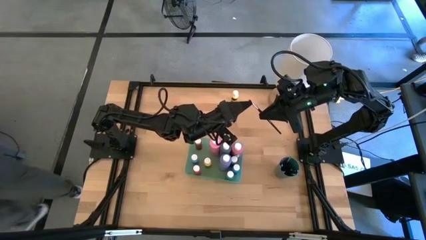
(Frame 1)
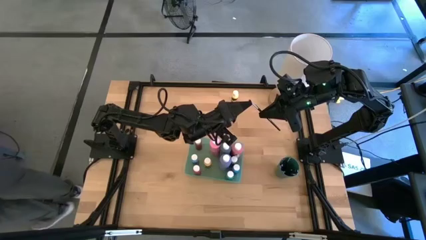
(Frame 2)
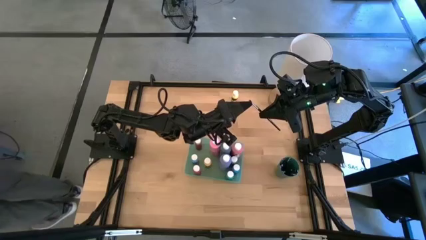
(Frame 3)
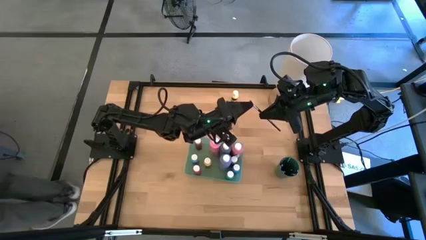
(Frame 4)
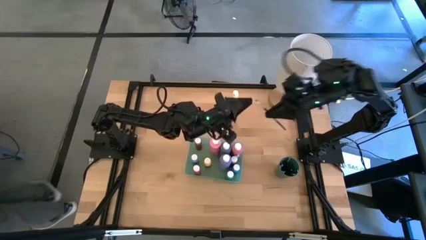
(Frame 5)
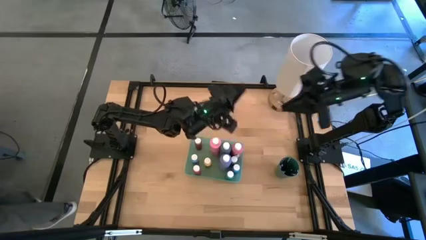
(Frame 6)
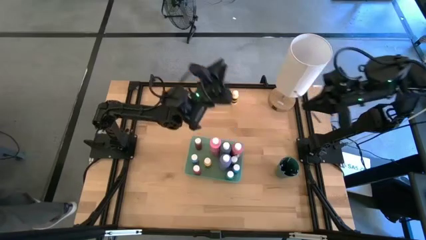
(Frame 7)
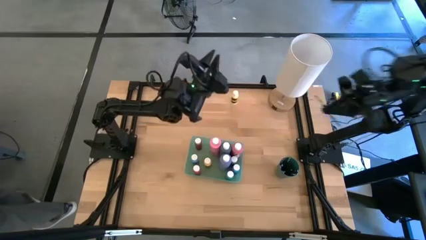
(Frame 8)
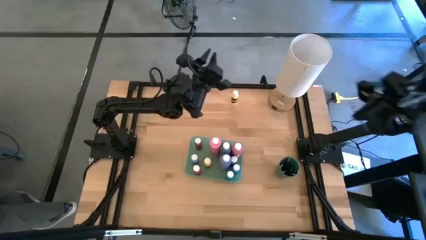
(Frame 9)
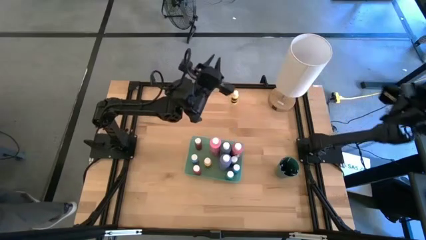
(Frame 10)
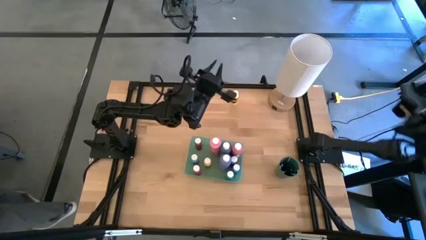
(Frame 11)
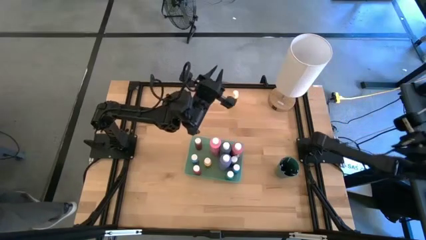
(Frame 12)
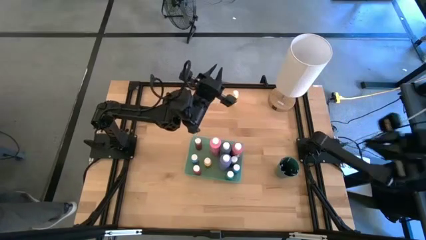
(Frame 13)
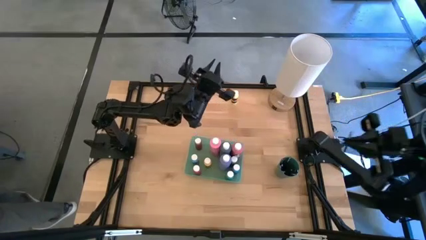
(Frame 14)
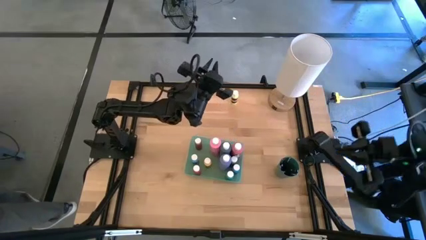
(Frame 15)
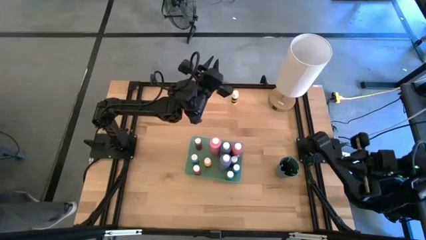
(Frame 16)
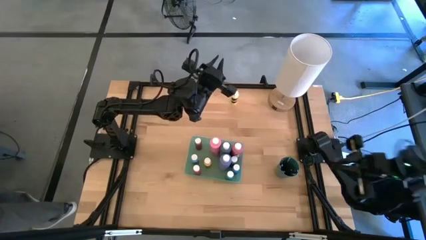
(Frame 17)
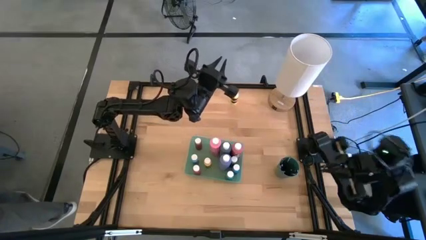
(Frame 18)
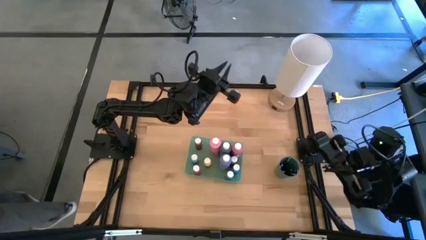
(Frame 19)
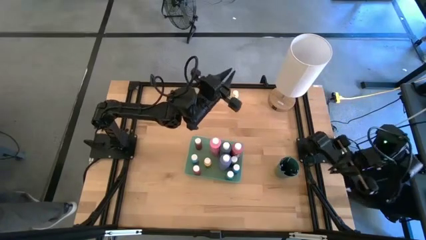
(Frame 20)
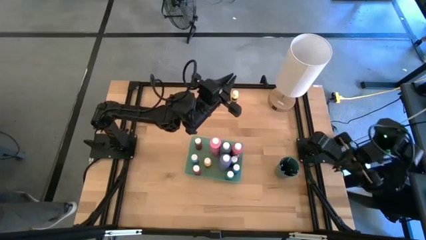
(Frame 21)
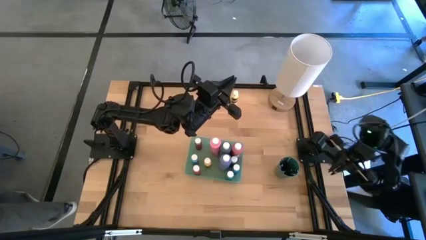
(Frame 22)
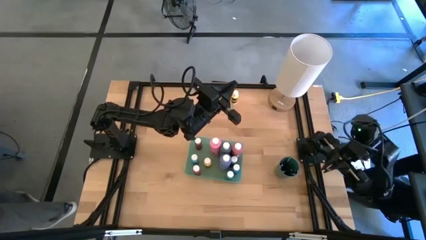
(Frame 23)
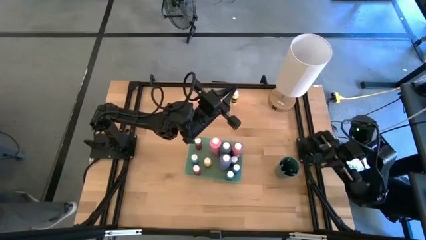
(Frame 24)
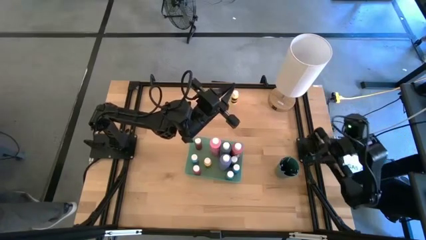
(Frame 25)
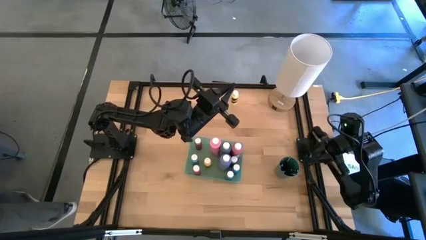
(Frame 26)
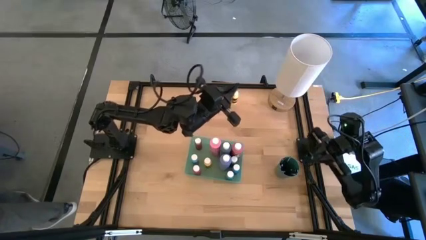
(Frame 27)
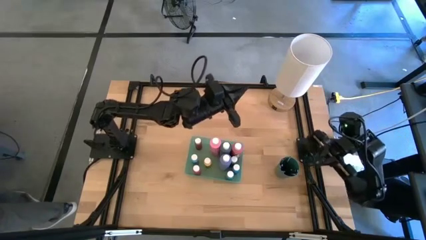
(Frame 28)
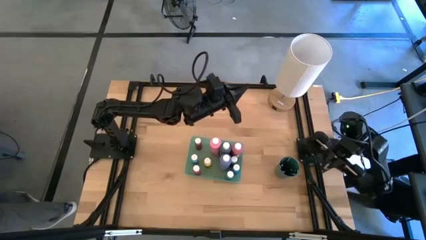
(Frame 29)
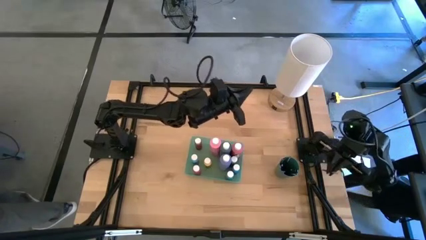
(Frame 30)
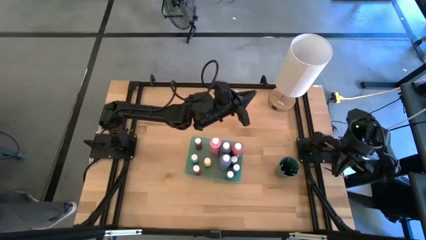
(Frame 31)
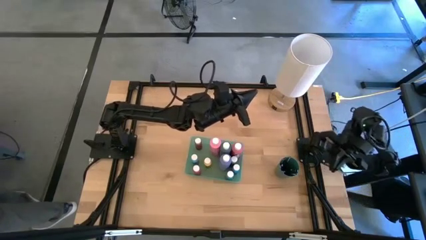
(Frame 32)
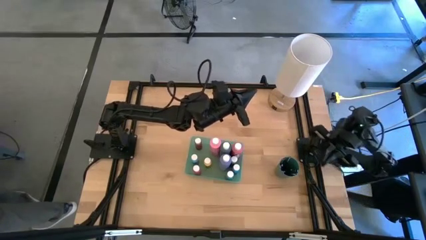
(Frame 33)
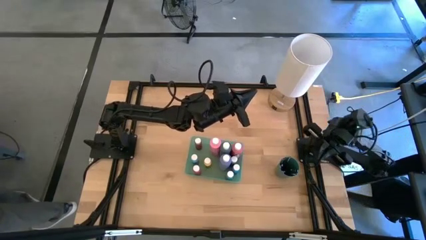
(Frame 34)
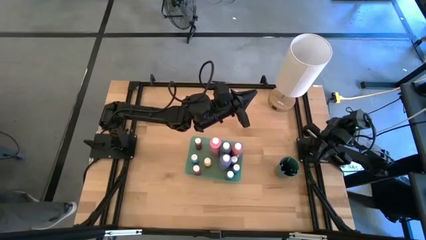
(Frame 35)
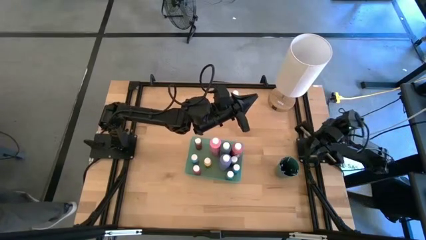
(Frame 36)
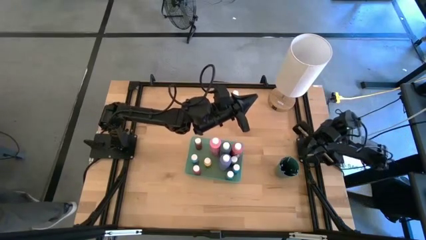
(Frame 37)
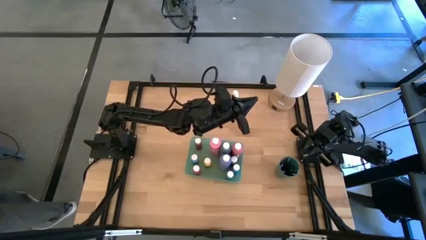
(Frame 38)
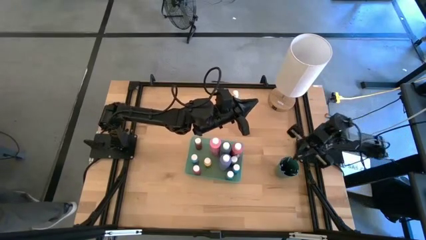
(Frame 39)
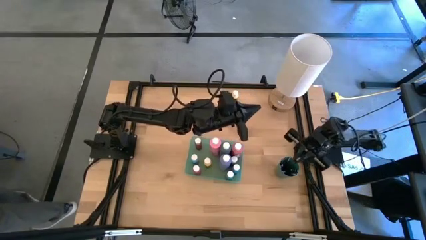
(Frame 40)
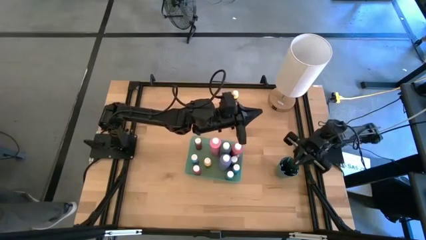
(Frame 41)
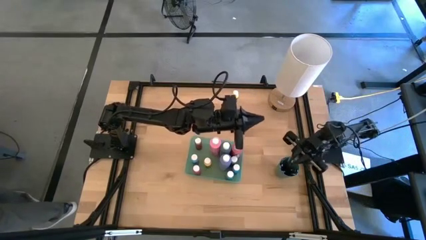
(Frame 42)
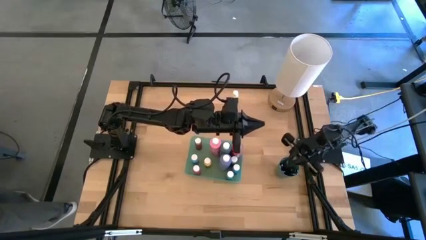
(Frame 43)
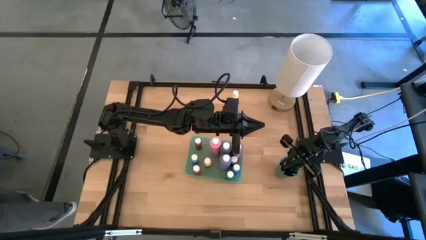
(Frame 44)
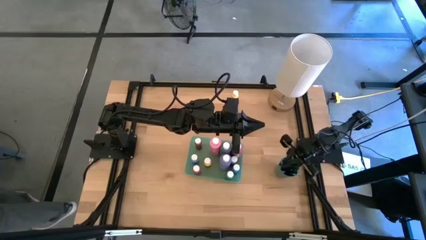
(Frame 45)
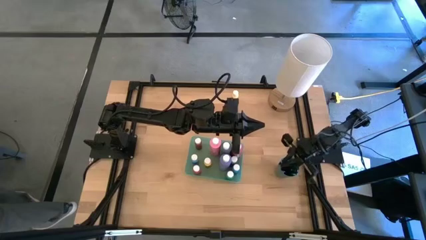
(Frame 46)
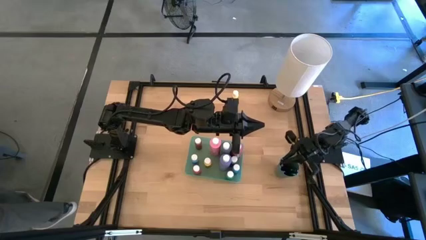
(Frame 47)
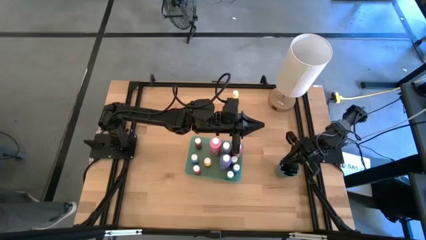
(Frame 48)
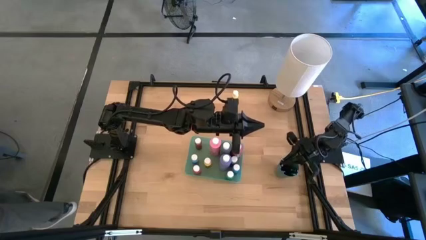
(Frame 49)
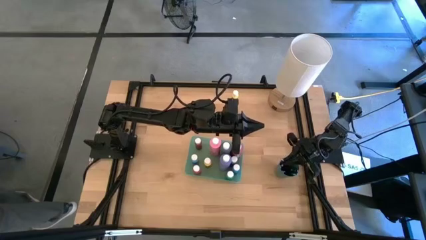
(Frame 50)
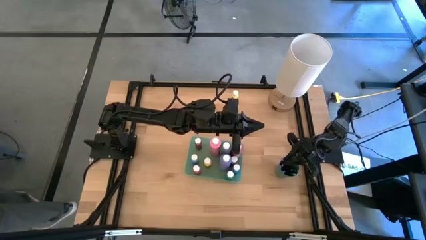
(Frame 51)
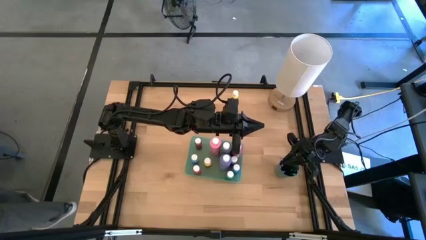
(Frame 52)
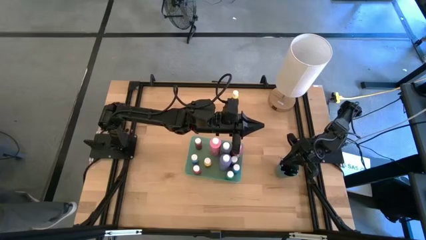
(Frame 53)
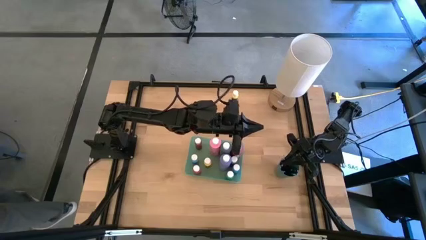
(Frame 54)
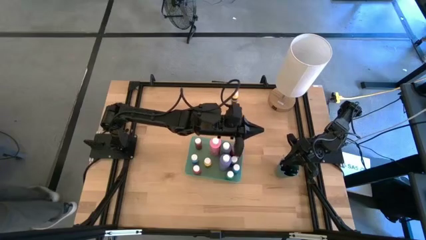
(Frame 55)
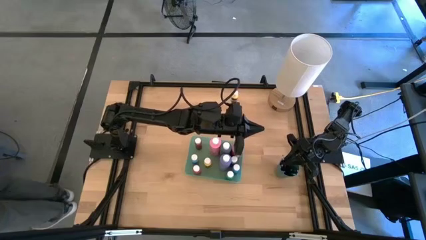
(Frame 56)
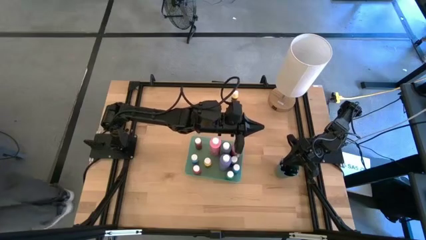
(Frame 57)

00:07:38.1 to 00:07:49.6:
Task: Pick & Place Paint Supplies
Put the black eyeshadow brush into the green cup
